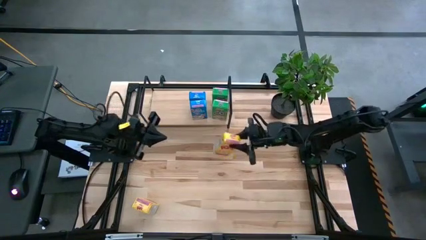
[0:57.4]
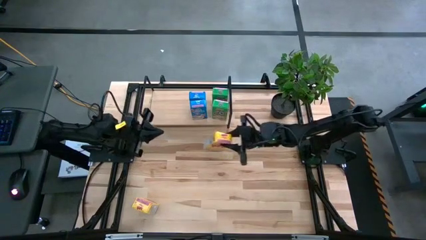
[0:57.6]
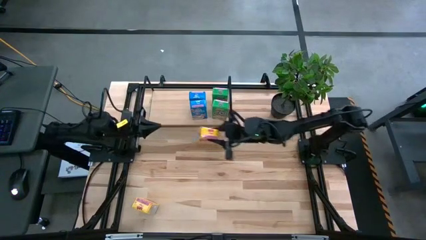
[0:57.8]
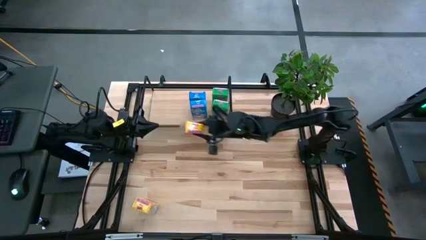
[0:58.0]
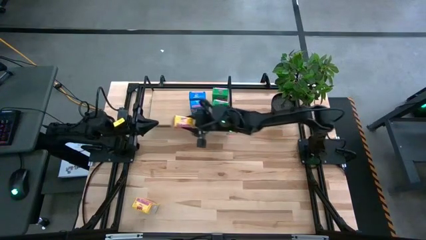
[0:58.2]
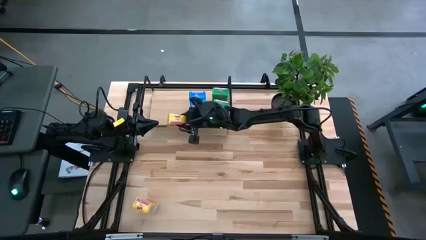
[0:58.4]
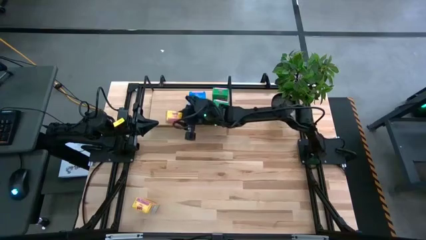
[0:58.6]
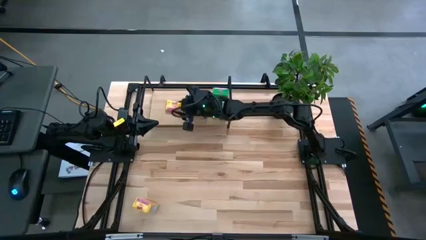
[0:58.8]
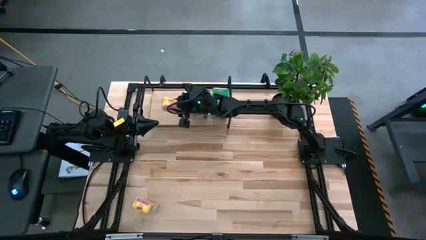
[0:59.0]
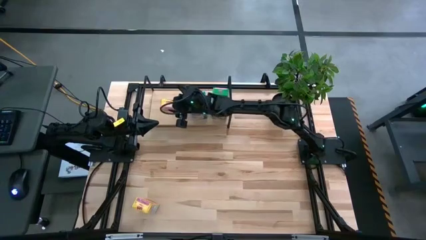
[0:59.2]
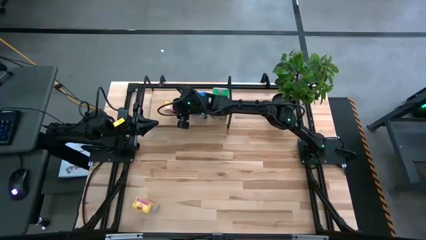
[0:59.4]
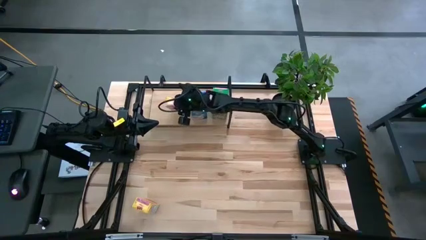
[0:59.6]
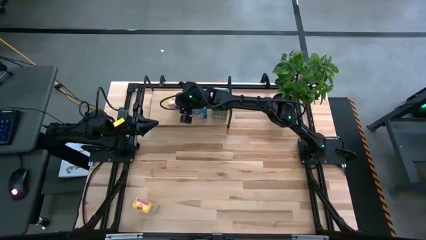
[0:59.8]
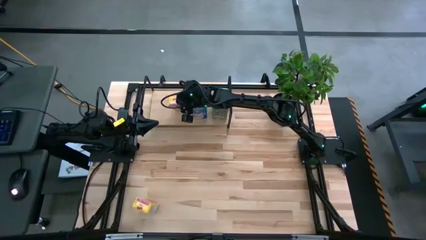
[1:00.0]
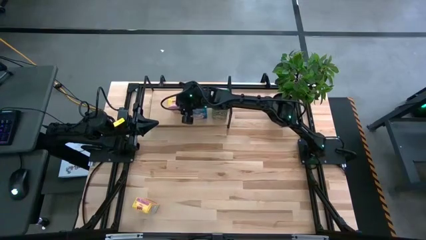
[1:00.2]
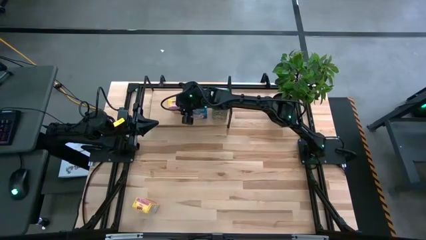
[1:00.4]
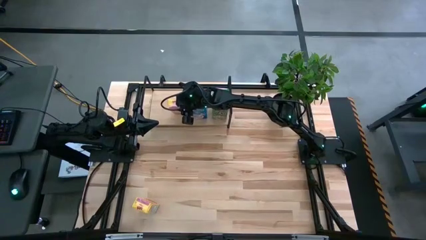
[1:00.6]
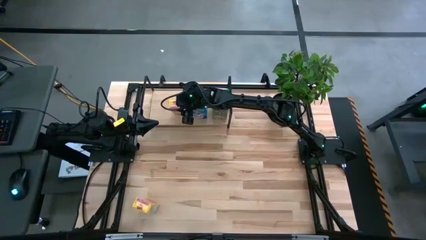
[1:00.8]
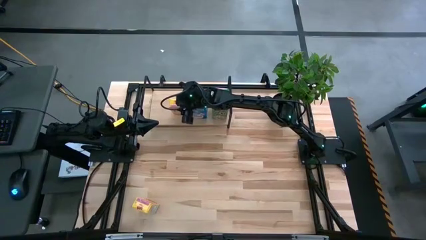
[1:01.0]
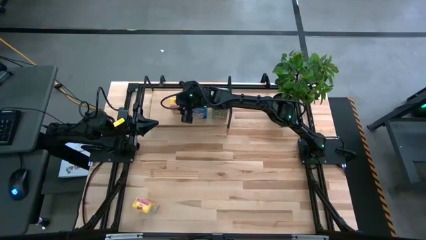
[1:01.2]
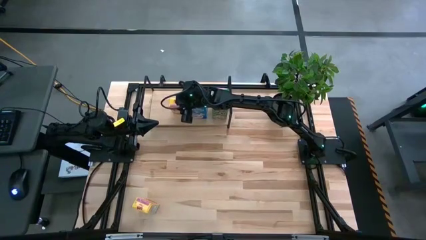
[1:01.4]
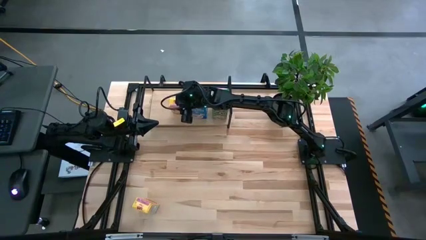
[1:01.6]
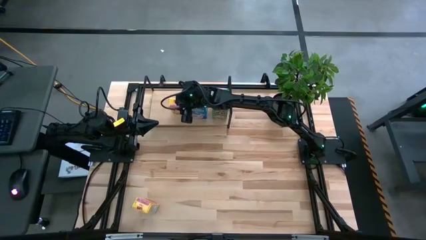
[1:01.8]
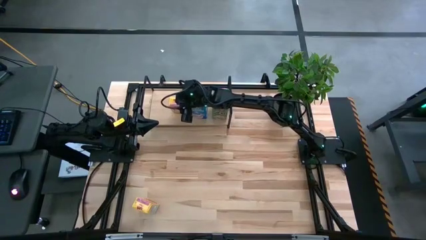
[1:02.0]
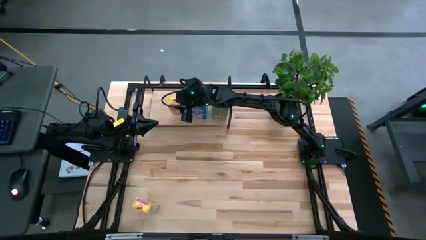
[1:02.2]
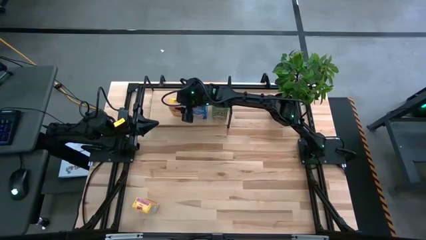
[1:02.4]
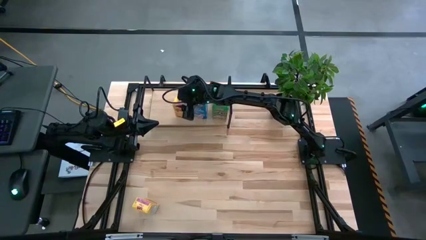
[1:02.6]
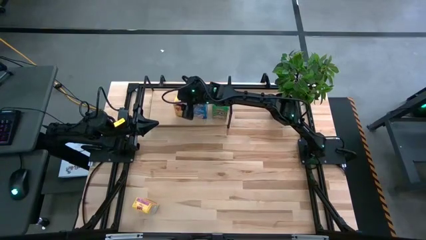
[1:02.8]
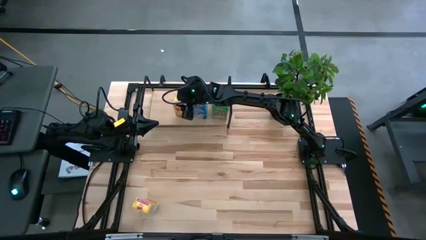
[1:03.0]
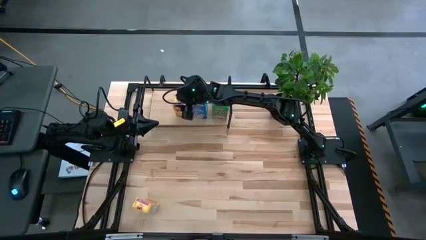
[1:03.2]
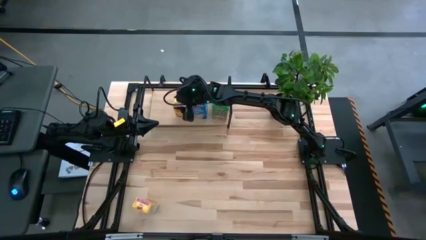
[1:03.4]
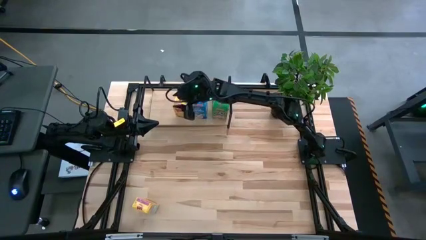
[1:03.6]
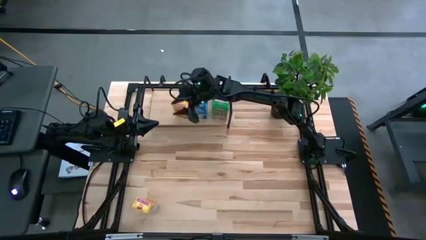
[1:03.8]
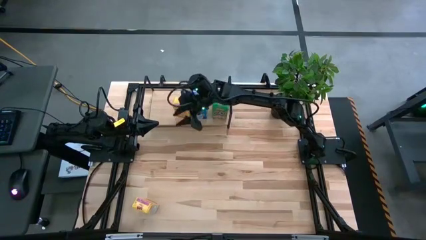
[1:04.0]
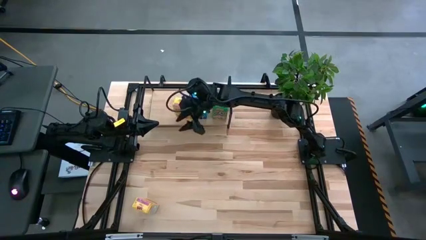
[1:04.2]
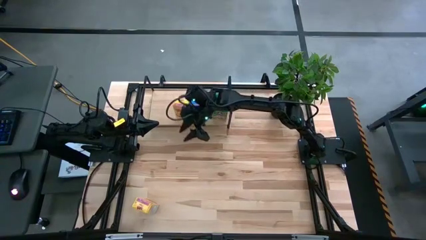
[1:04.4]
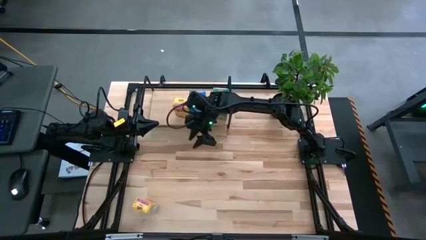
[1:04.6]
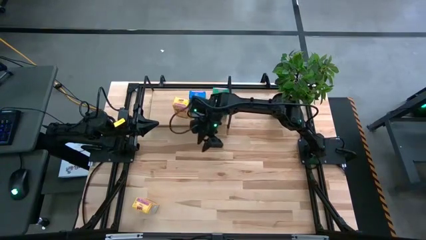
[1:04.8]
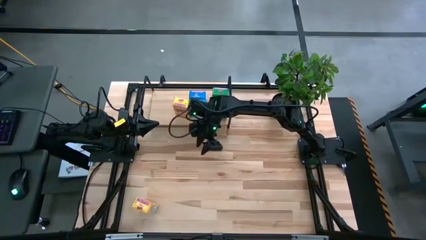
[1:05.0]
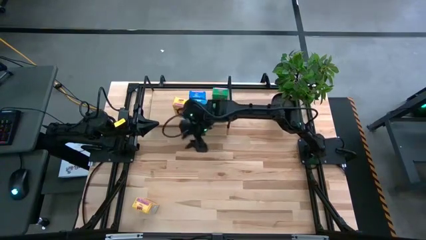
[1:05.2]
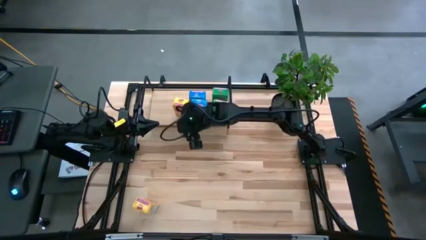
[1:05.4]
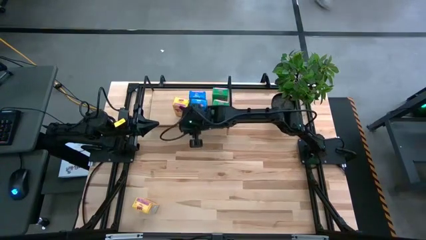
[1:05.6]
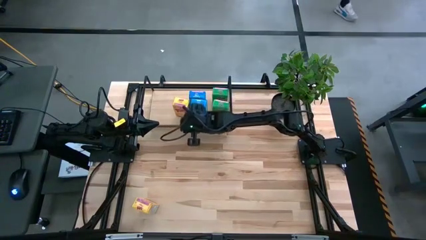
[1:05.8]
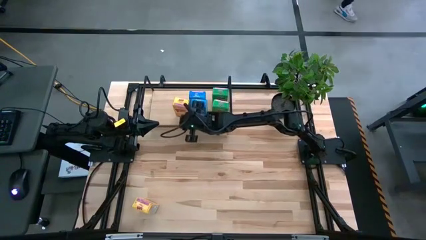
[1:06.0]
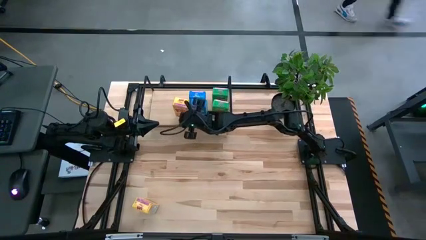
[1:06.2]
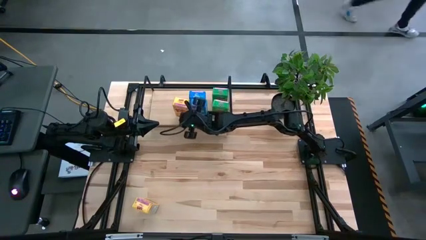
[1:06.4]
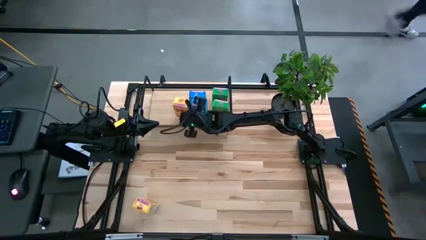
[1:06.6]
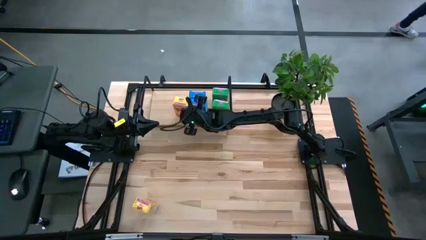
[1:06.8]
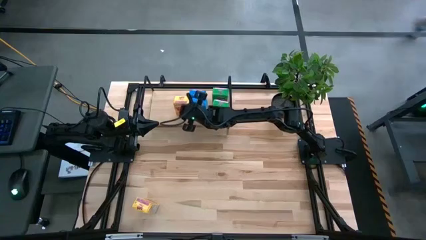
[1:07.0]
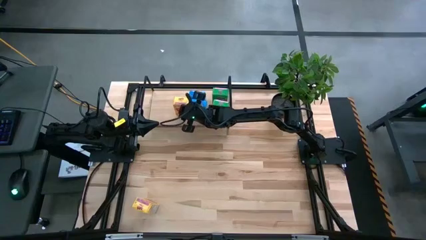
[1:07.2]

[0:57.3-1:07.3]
Task: Stack cereal on shelf
Put the top yellow cereal box on the shelf

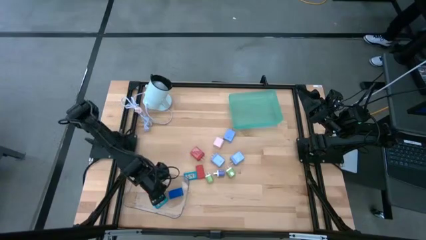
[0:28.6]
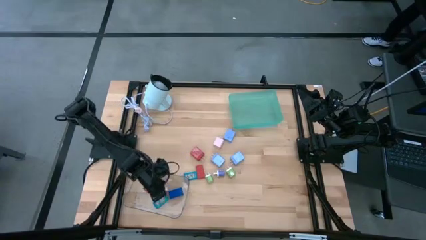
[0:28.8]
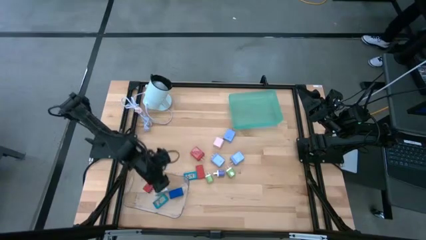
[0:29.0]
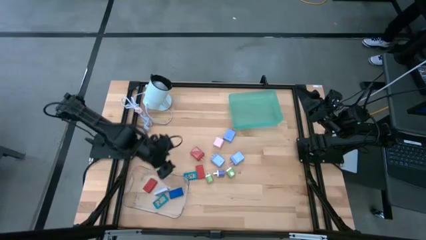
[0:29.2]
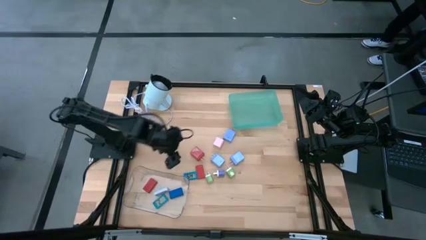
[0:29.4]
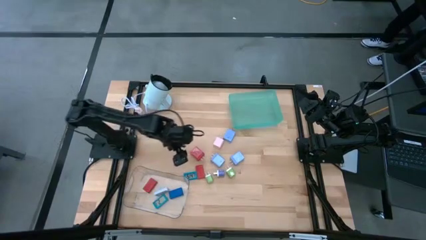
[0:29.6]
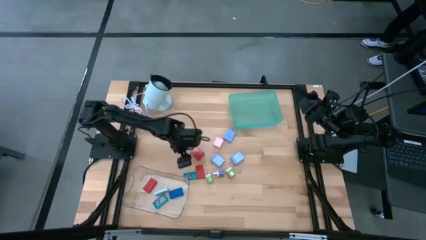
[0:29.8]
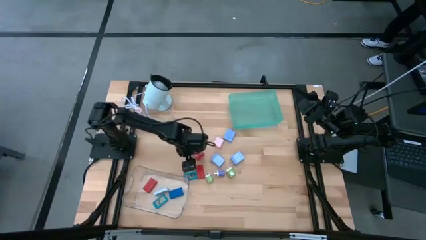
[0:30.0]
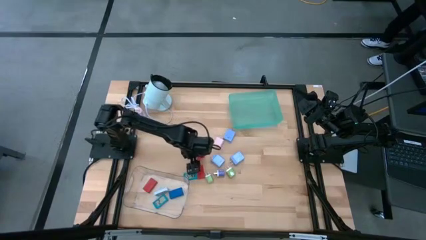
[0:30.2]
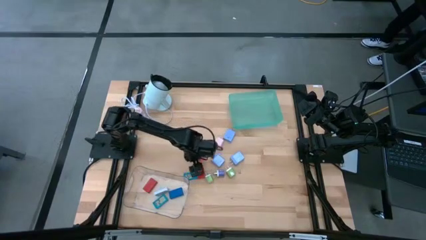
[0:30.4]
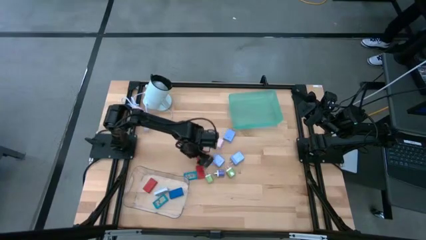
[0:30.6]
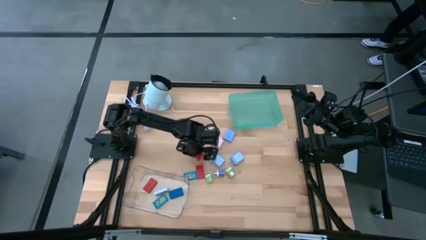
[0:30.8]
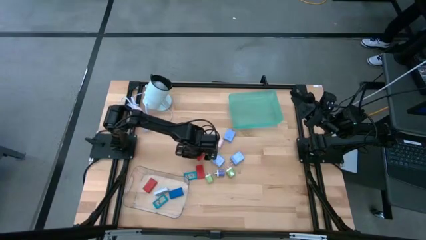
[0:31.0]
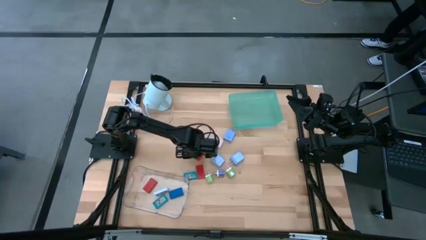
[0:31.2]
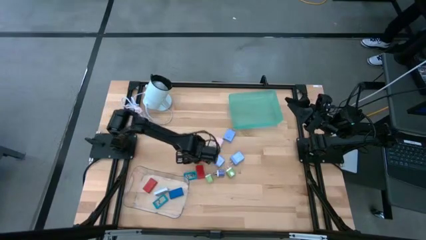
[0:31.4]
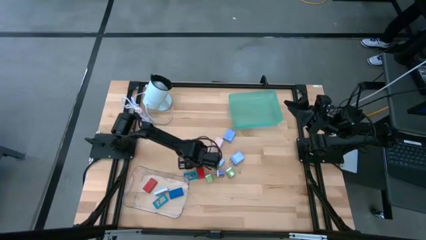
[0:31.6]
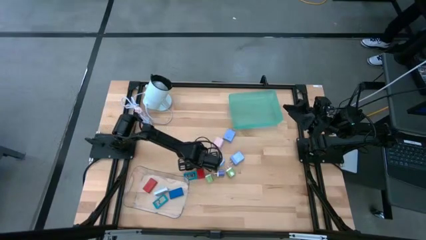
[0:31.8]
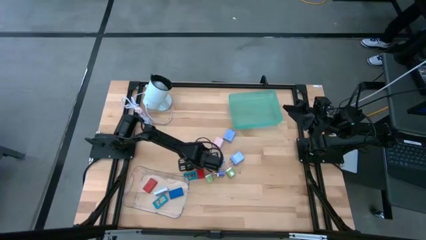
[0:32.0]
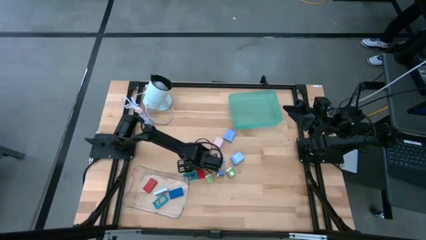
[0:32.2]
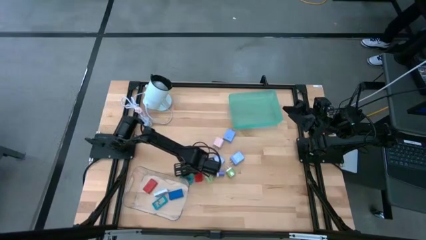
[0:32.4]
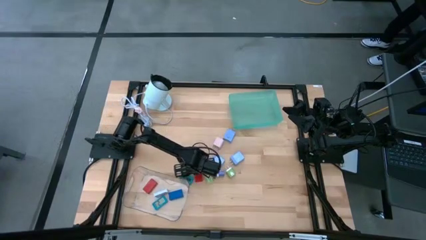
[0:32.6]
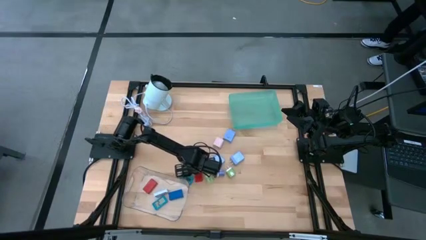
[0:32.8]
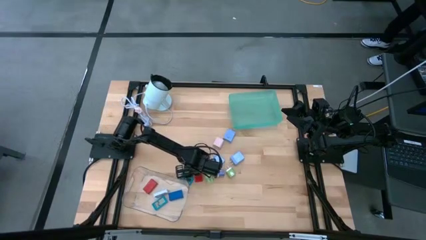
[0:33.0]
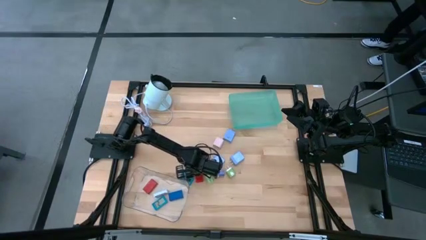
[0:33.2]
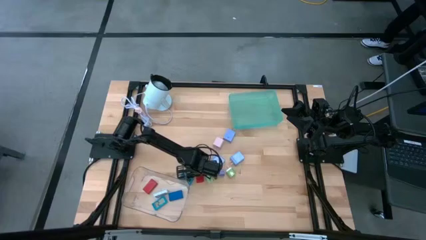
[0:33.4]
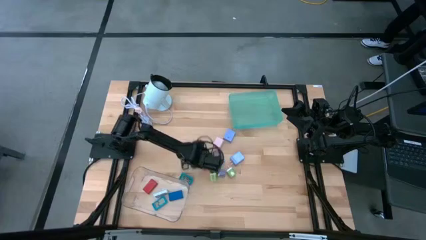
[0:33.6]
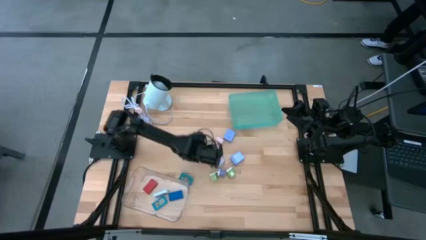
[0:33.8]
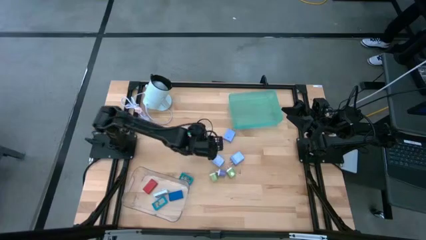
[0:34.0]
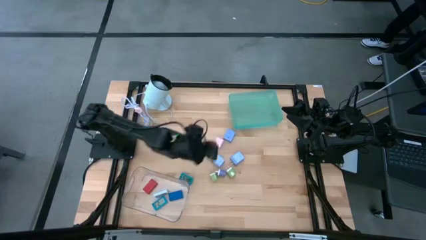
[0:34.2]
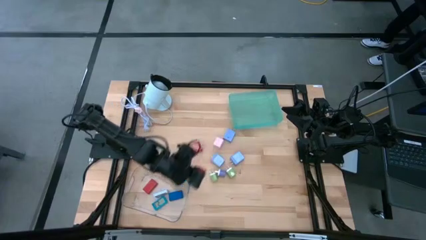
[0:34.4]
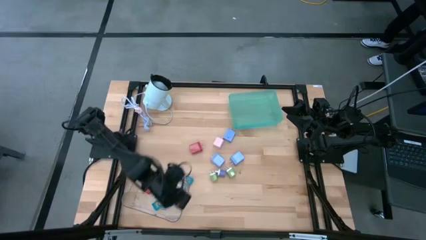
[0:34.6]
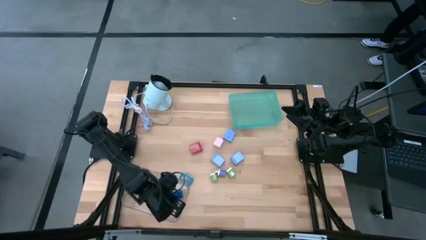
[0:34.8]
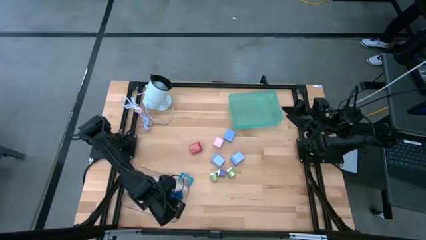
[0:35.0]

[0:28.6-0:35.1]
Task: Pick & Place Office items
Put the red digital clock into the transparent bin

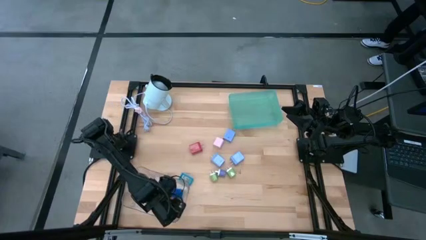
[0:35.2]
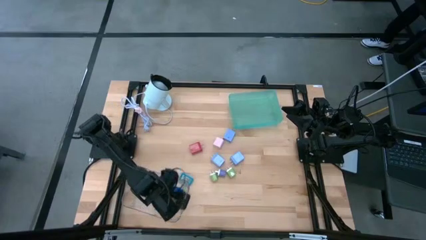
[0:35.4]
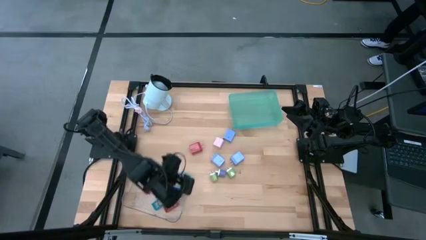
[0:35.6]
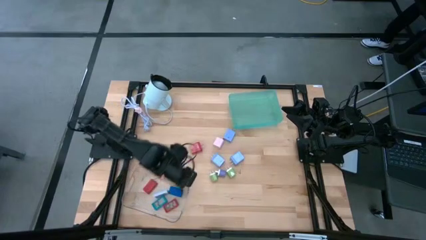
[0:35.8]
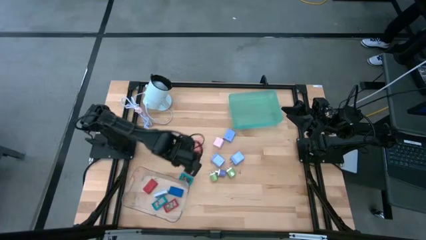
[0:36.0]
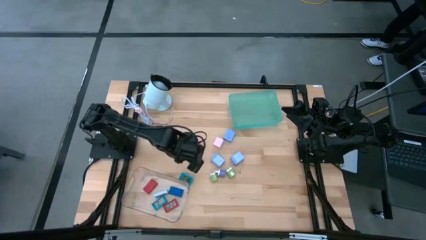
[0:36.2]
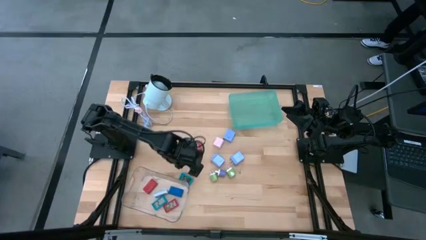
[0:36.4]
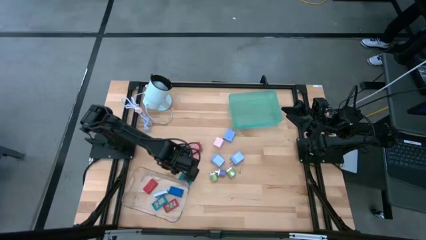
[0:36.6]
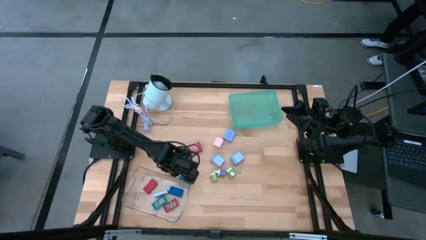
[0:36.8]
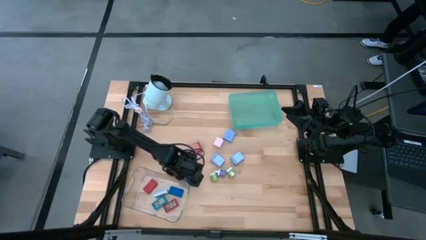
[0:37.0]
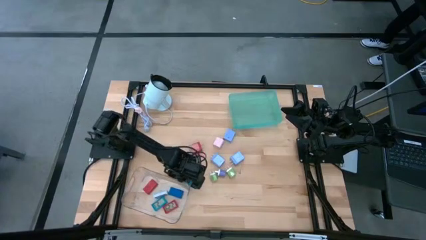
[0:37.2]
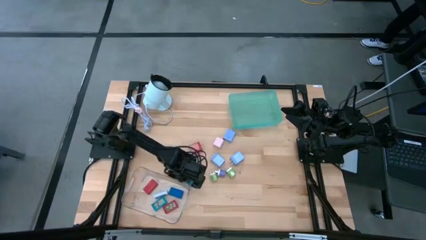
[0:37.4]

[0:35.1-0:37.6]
Put the light blue digital clock into the transparent bin
